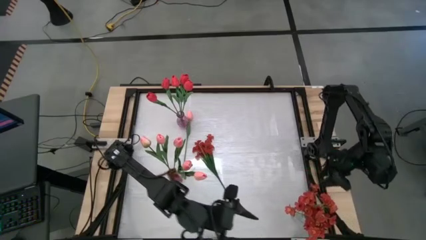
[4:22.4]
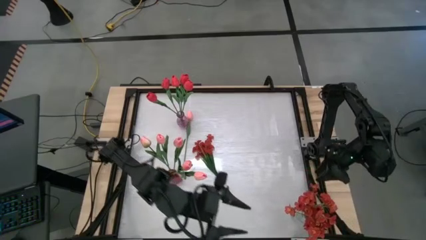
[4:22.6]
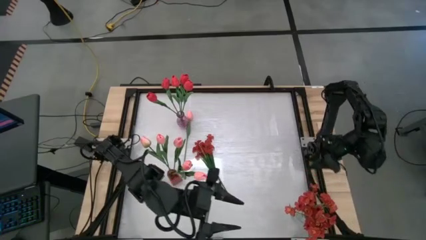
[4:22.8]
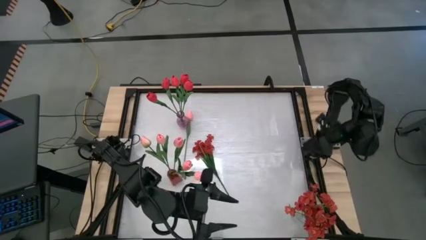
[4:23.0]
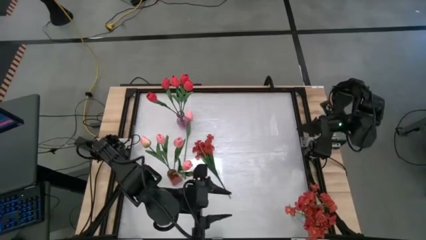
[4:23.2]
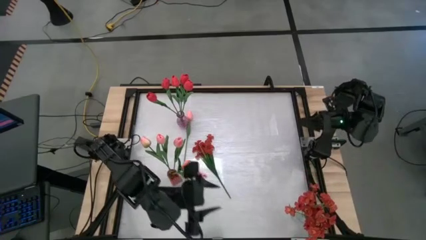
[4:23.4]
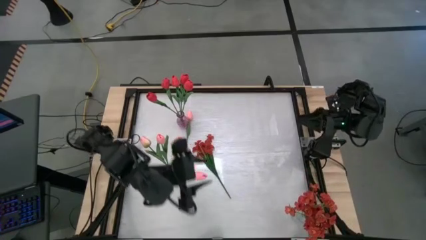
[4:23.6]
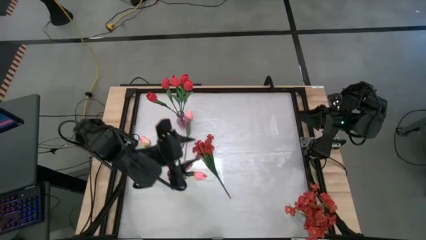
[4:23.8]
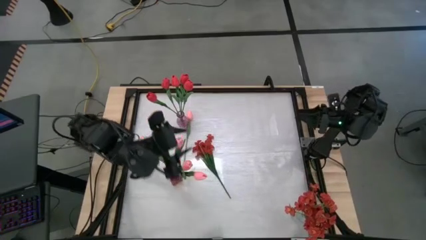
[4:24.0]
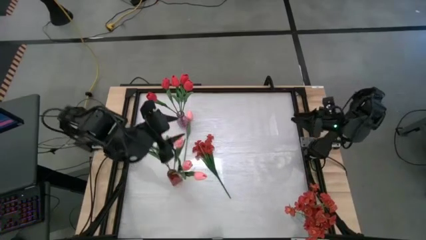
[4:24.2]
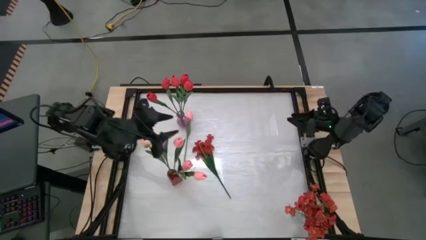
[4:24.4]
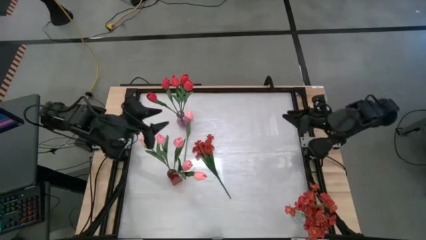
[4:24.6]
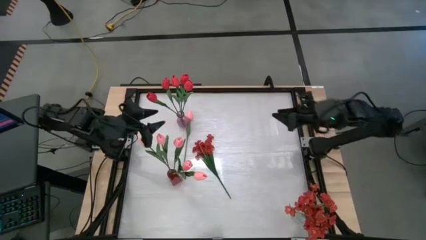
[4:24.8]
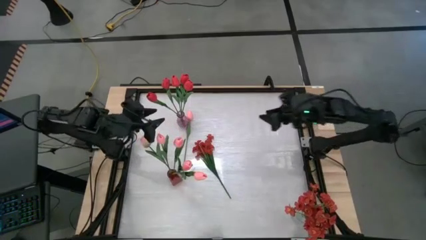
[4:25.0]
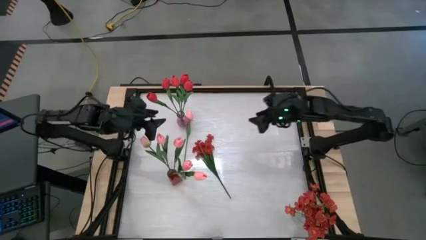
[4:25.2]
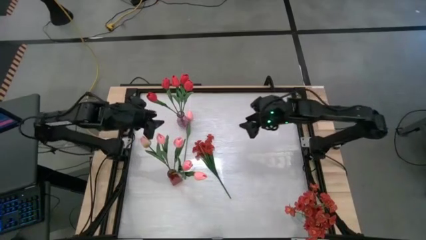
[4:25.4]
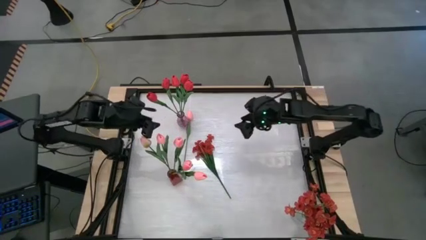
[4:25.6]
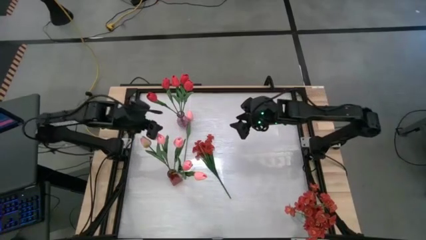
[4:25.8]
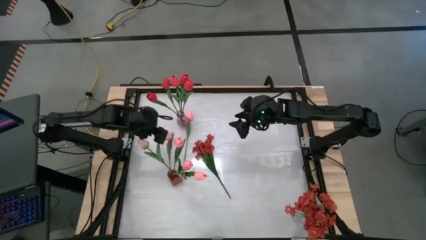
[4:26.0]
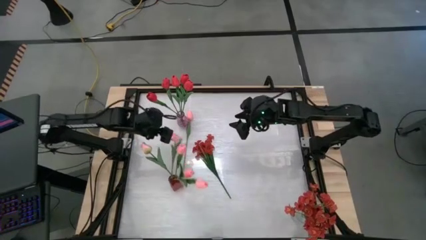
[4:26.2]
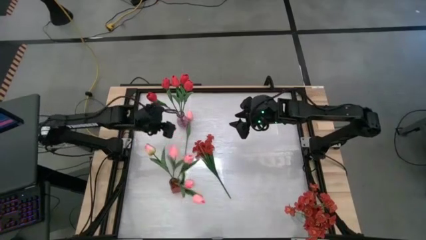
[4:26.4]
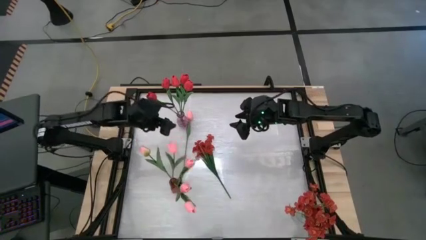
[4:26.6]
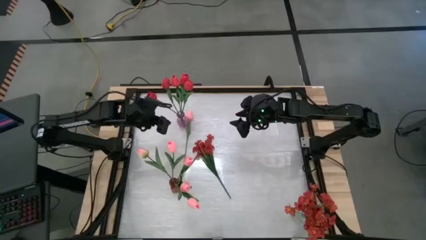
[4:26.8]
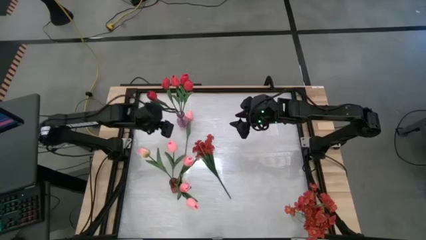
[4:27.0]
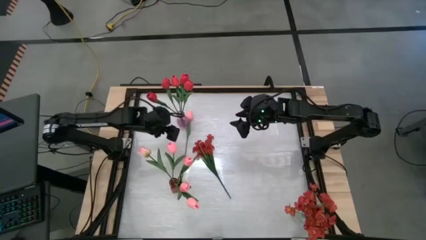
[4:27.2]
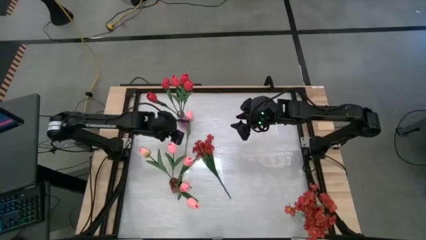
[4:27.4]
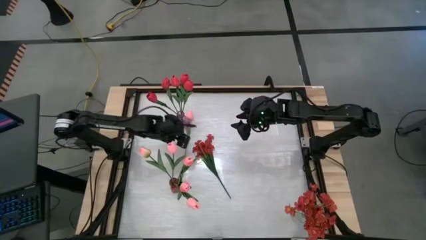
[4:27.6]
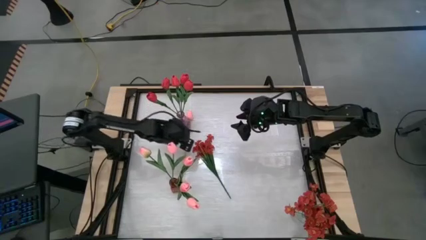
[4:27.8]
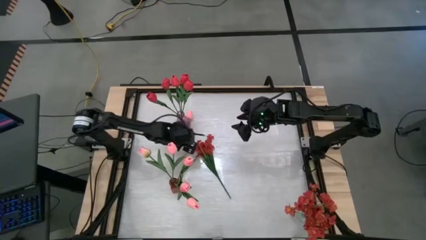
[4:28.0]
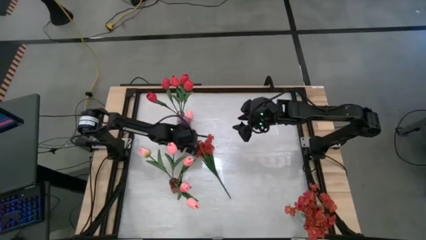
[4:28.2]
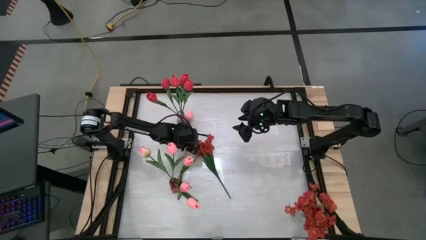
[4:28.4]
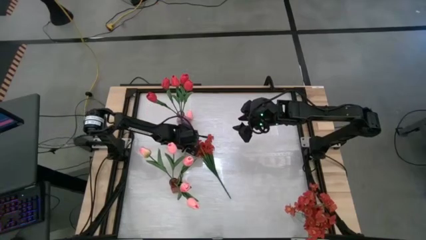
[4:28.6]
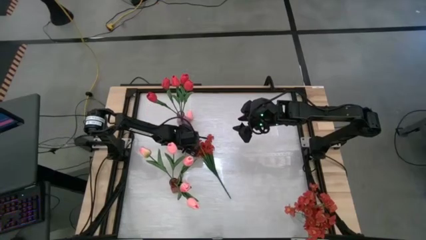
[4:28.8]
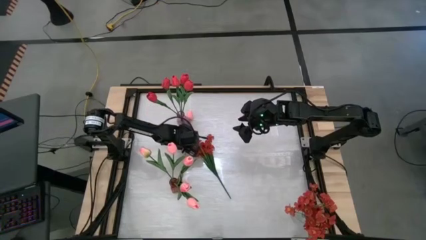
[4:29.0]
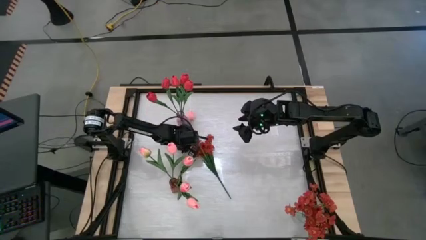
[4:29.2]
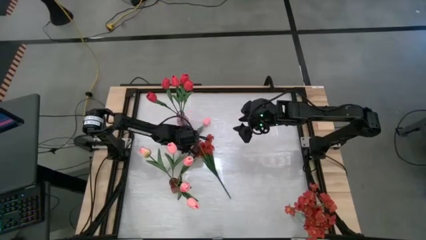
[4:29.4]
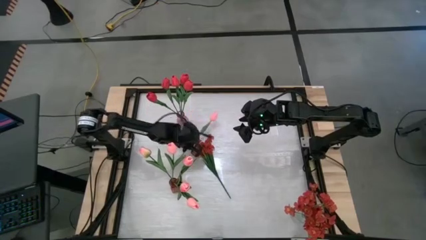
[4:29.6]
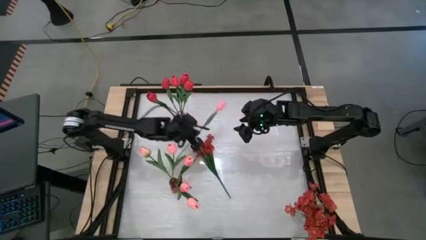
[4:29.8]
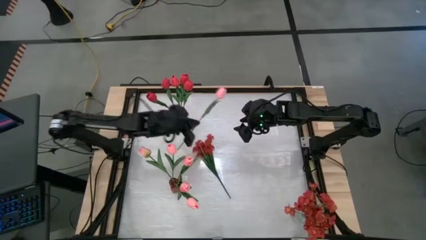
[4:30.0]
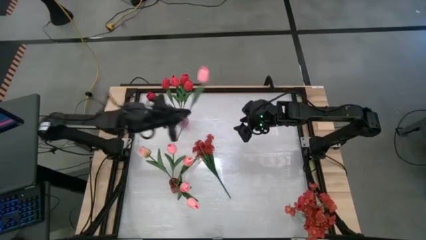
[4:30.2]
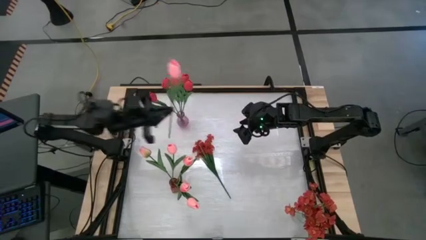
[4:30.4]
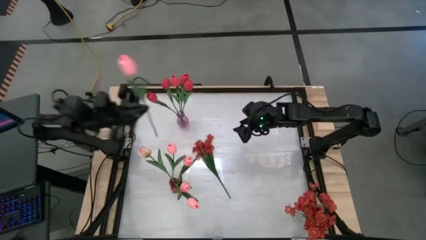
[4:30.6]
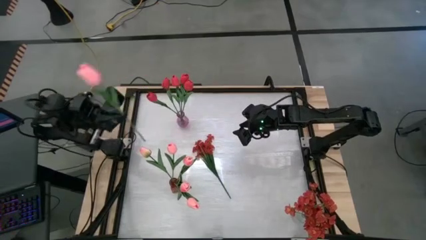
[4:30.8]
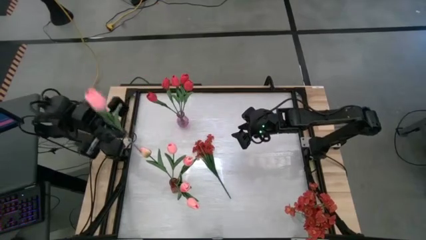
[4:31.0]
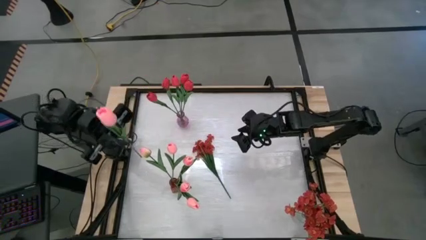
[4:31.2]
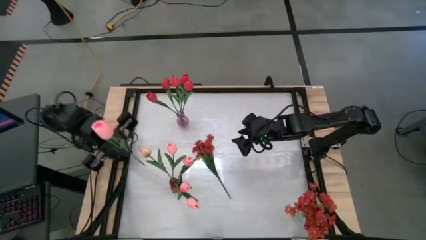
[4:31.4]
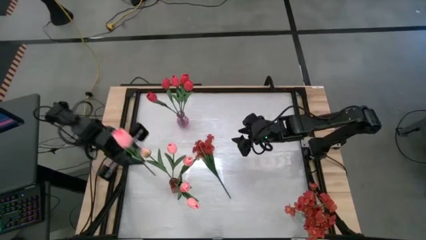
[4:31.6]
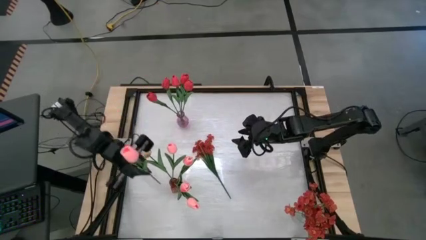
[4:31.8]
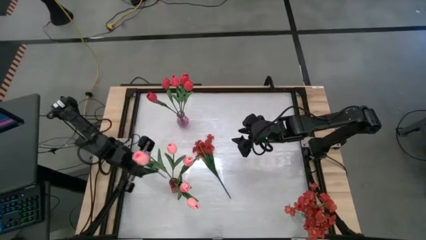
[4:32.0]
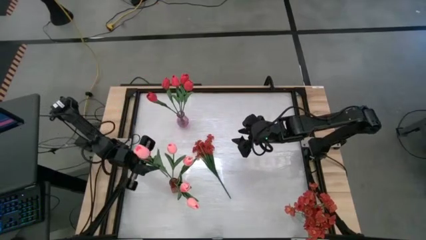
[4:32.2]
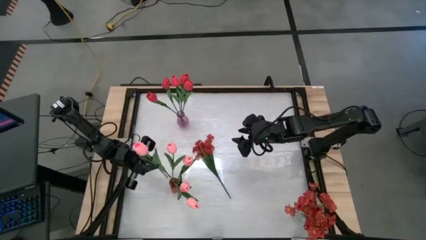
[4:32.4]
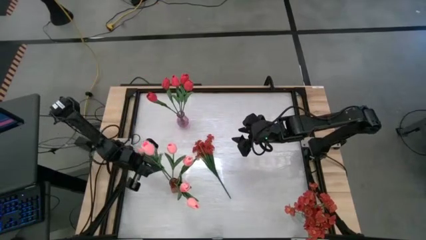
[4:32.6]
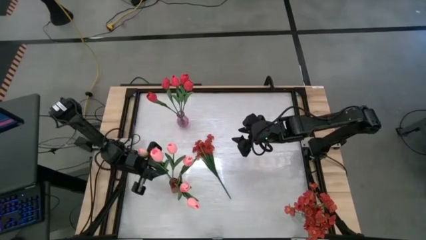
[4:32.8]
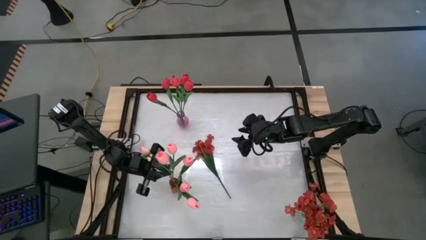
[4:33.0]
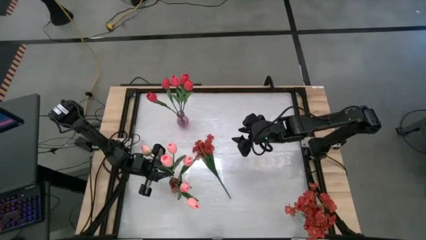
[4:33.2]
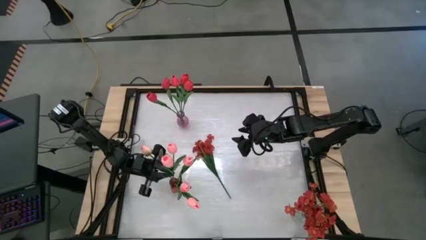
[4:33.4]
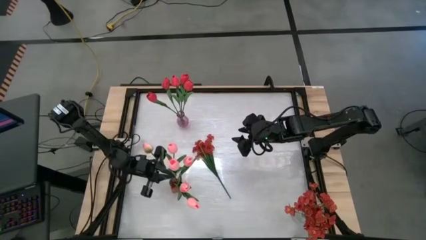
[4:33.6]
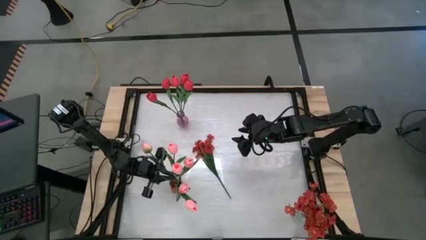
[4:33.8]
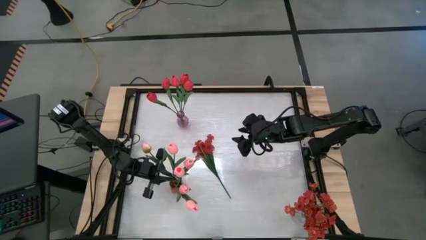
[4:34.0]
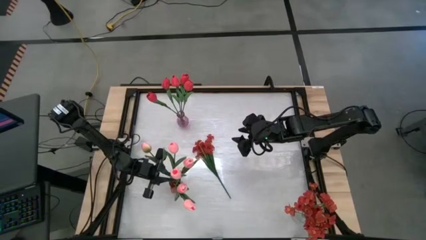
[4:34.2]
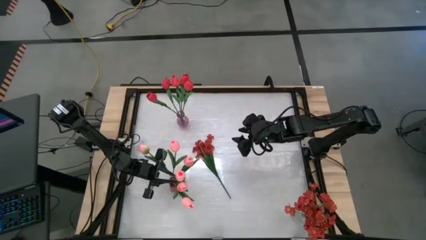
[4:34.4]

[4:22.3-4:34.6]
Task: Sort flowers into vase by color
Put the pink tulip into the red vase
